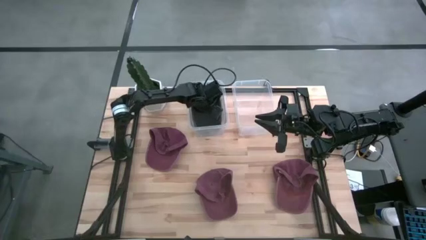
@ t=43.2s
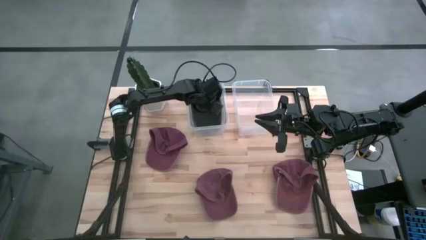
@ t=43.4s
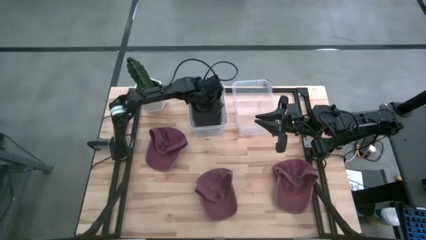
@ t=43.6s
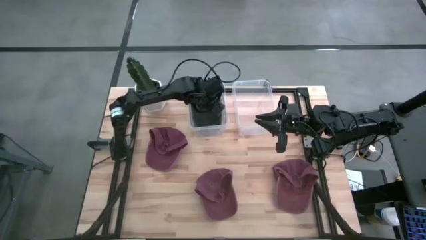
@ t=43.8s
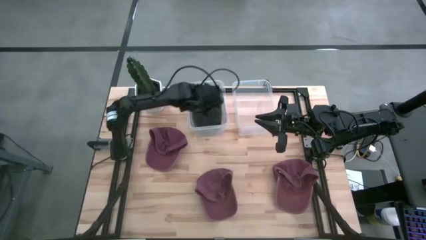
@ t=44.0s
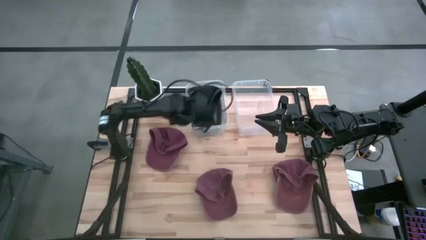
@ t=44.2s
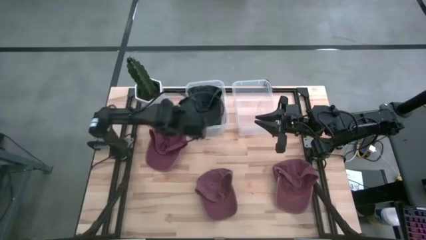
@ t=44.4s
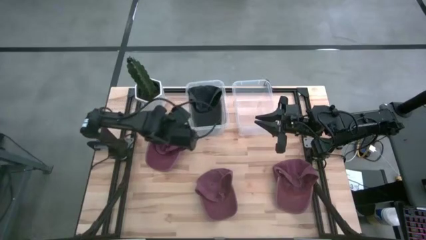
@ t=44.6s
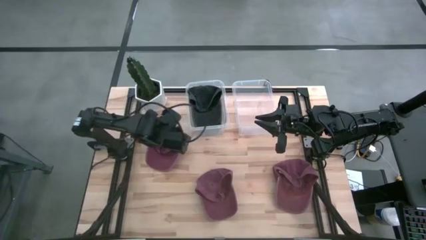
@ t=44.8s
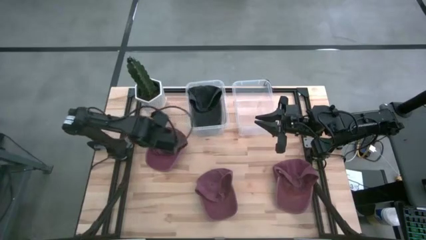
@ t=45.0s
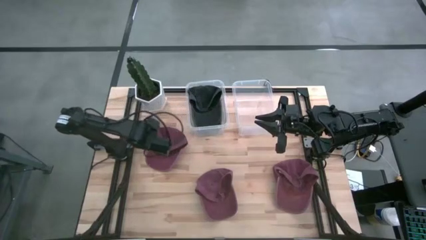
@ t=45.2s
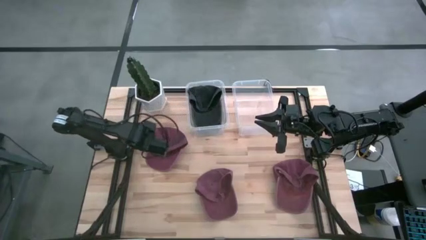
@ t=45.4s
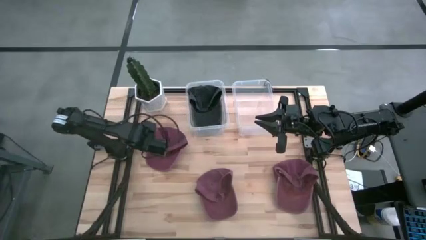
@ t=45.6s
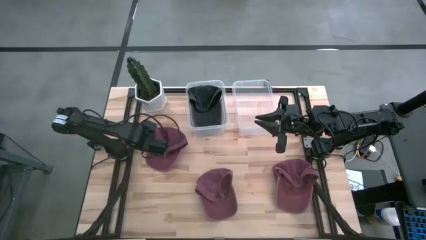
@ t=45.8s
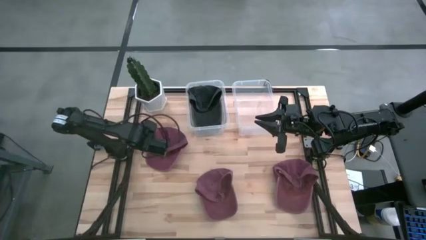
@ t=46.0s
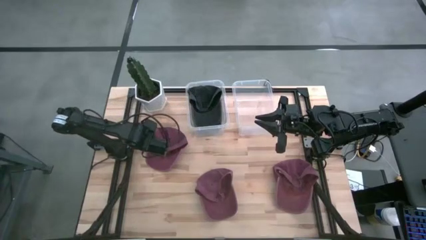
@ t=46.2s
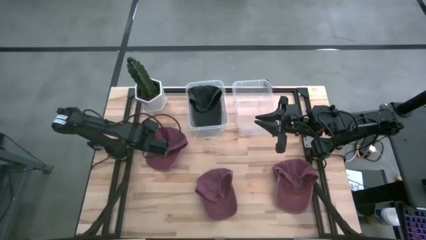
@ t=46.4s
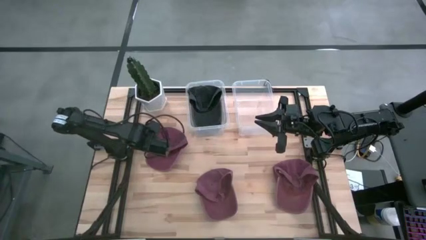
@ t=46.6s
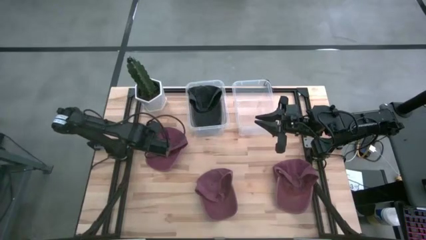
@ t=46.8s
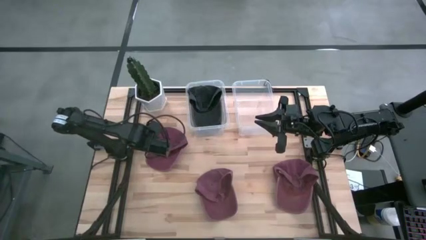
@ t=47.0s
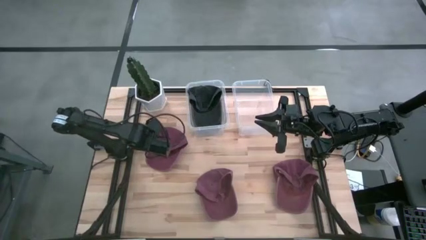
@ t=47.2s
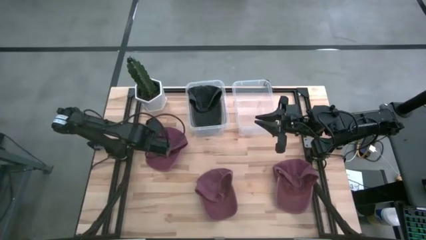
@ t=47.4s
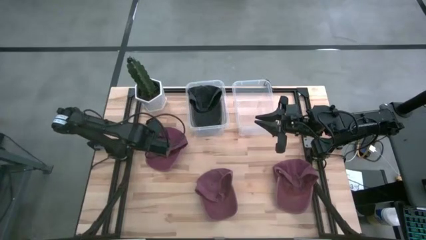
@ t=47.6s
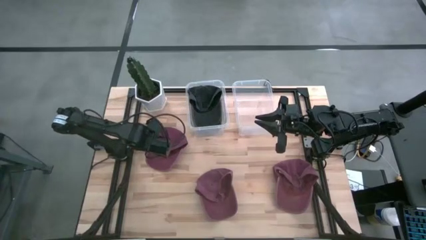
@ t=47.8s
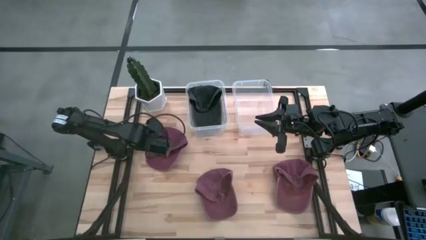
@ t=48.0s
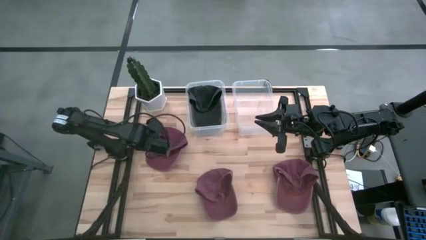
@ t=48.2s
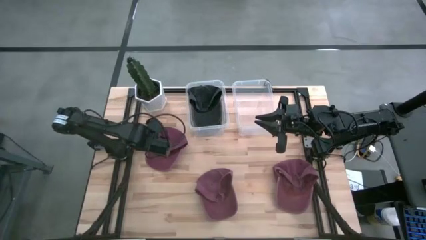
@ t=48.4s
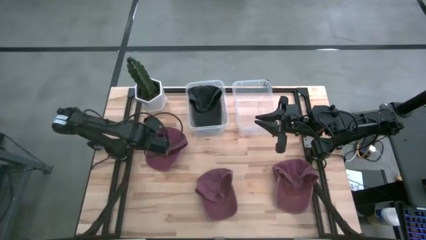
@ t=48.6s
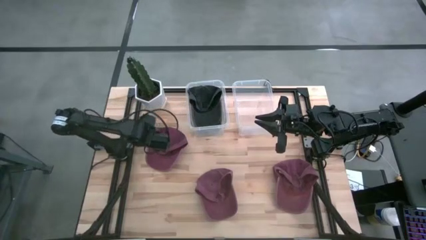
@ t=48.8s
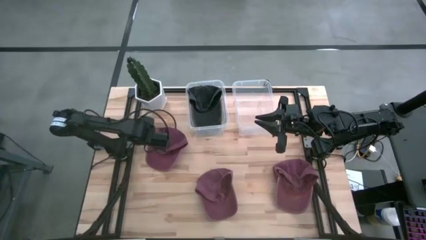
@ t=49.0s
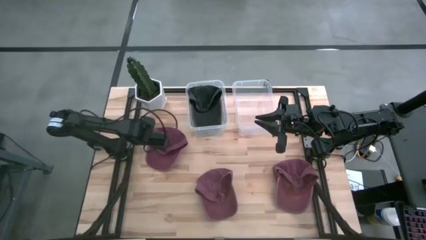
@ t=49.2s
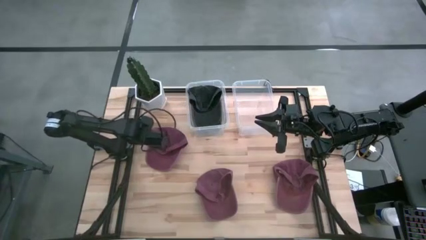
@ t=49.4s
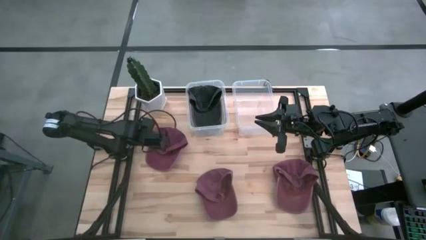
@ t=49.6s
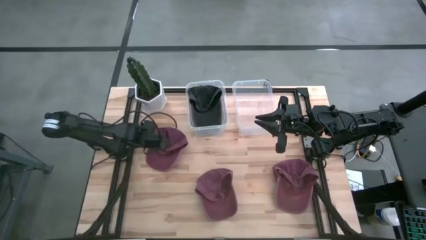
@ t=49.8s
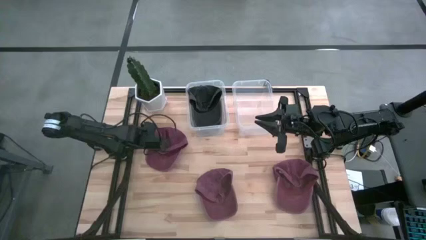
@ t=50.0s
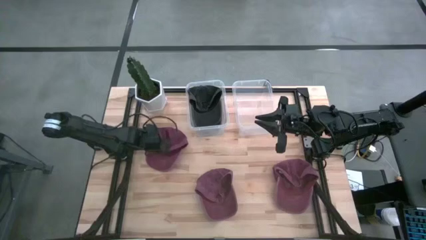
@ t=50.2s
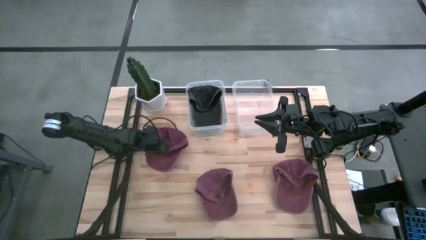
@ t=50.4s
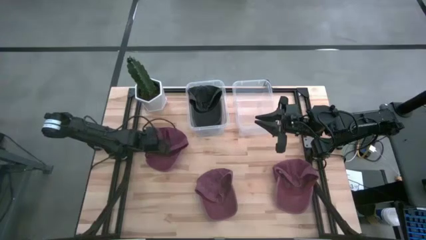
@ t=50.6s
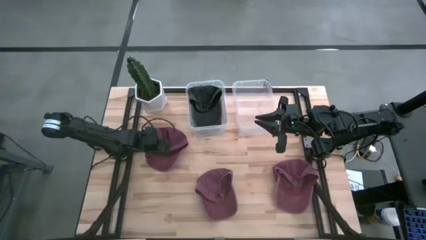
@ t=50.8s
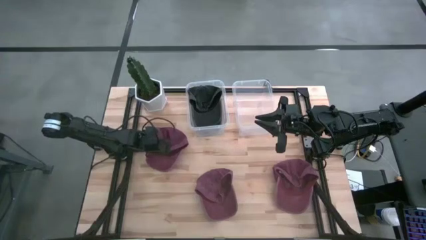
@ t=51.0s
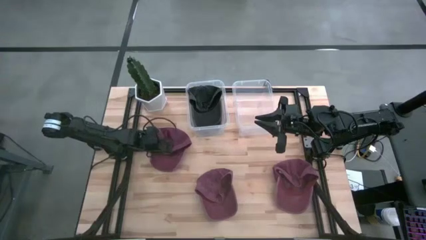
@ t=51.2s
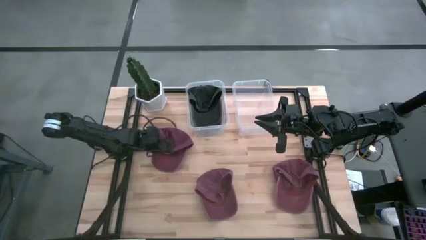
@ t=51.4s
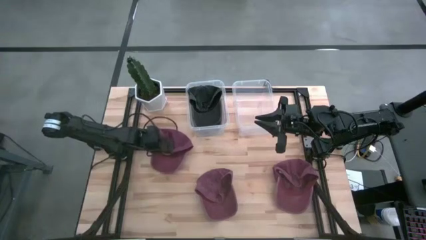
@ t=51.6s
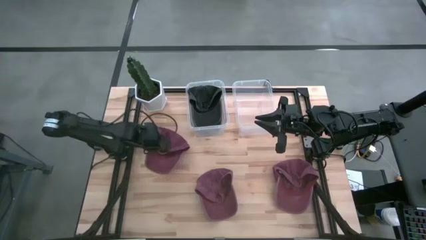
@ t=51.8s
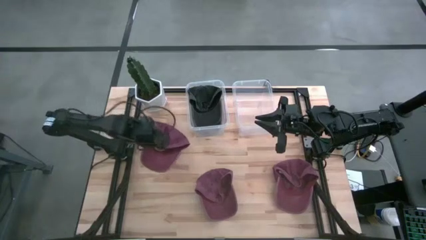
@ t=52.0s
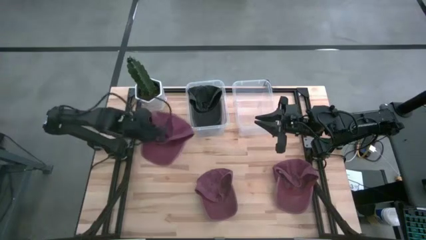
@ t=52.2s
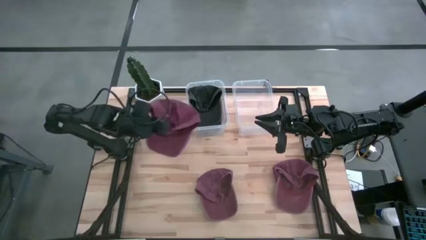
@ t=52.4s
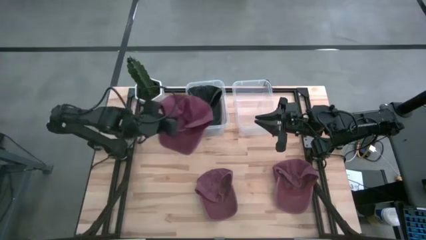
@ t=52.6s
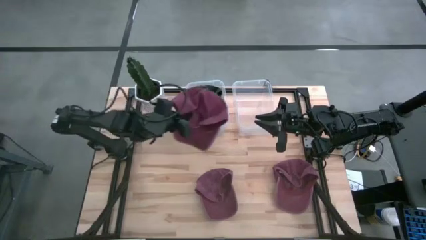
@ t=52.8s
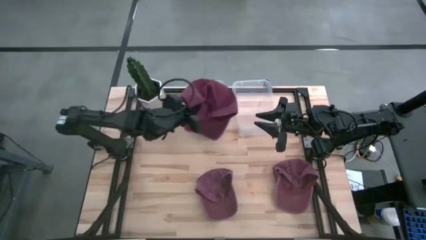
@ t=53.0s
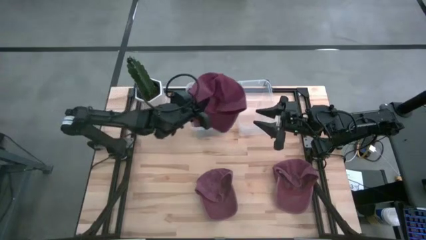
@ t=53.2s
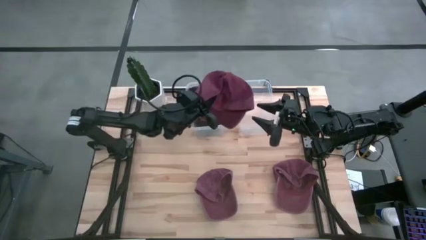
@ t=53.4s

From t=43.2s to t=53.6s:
Task: Pick & Place hat
Put the top pink cap into the right transparent bin
